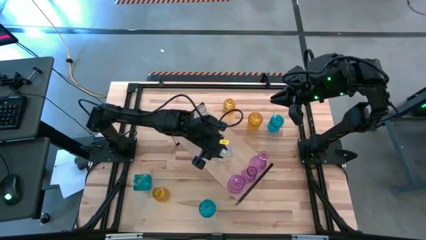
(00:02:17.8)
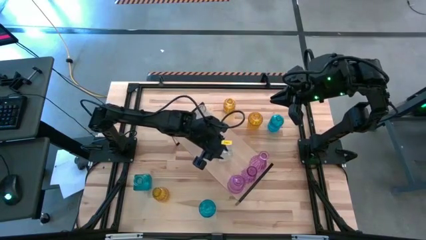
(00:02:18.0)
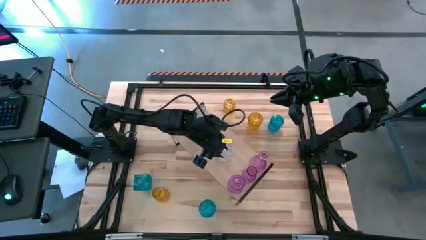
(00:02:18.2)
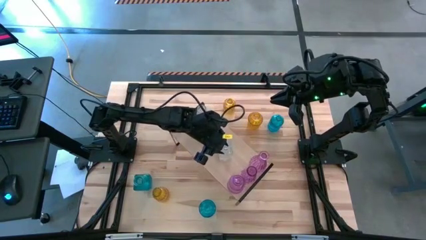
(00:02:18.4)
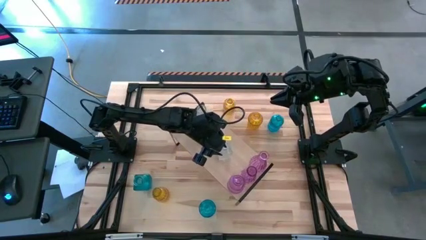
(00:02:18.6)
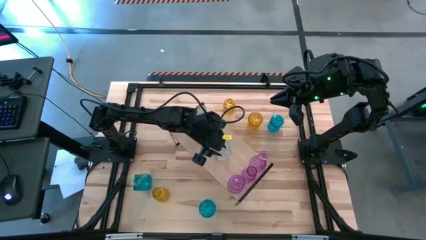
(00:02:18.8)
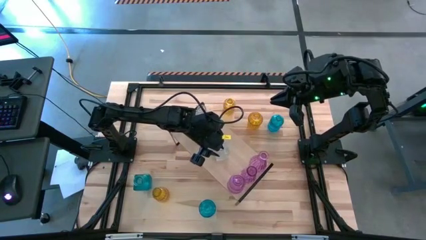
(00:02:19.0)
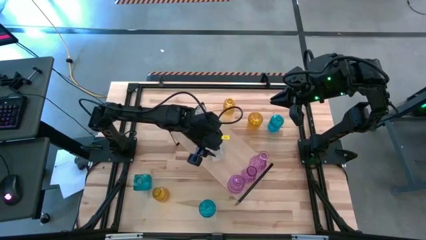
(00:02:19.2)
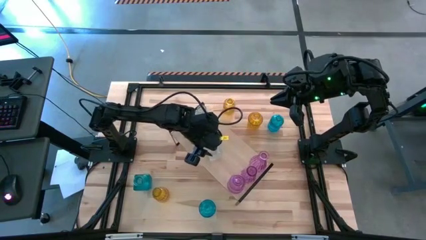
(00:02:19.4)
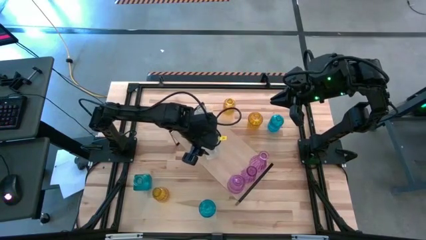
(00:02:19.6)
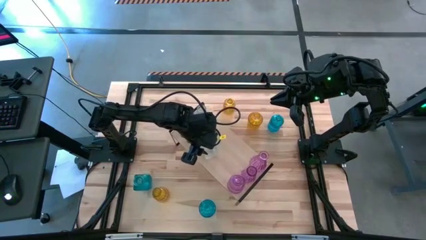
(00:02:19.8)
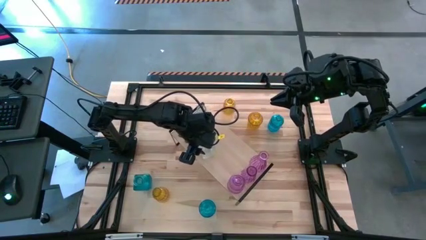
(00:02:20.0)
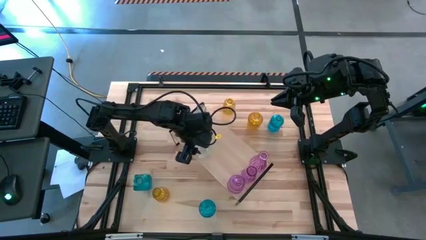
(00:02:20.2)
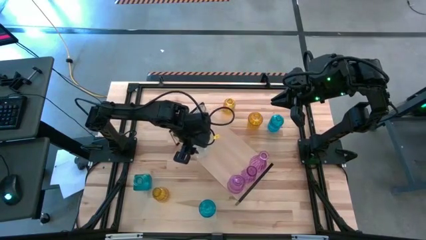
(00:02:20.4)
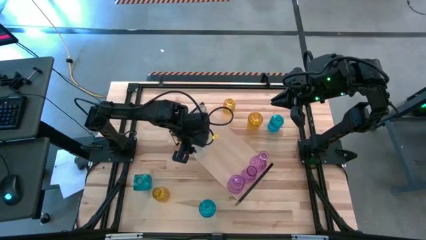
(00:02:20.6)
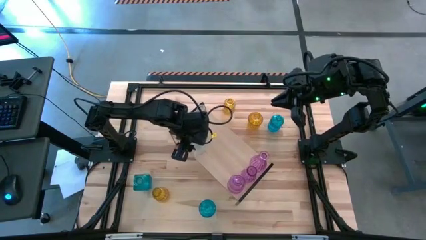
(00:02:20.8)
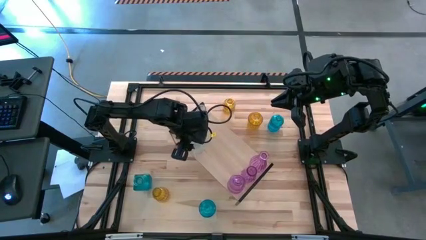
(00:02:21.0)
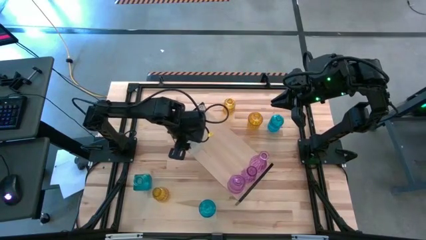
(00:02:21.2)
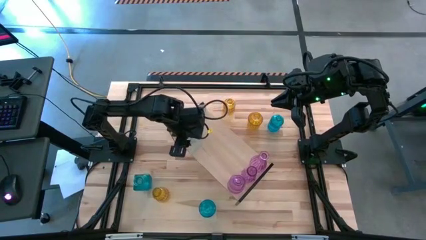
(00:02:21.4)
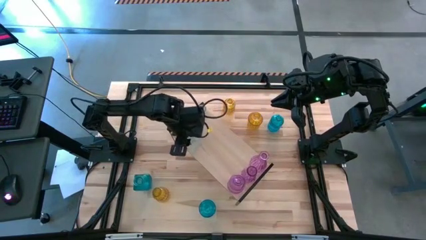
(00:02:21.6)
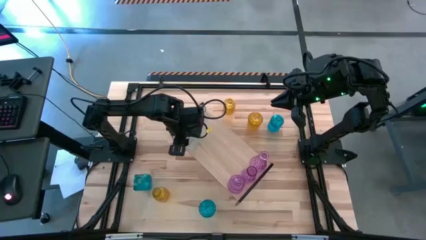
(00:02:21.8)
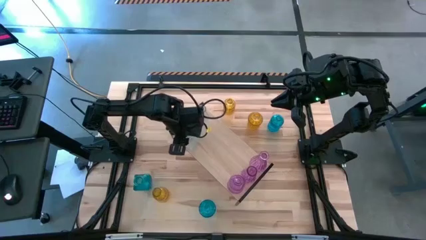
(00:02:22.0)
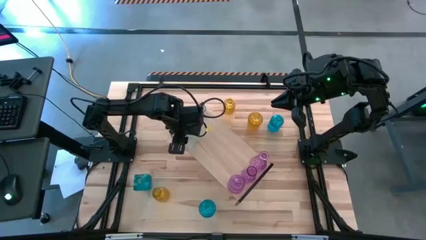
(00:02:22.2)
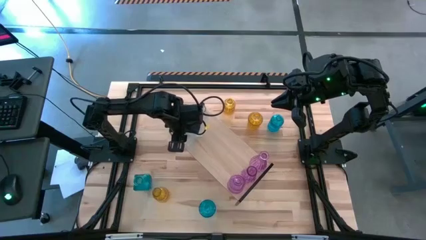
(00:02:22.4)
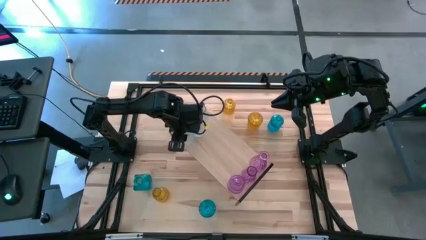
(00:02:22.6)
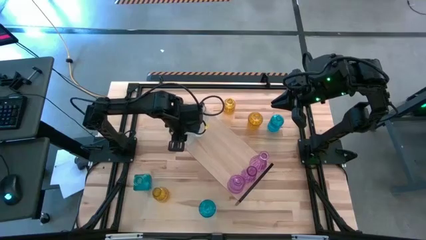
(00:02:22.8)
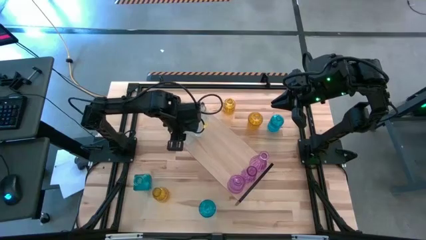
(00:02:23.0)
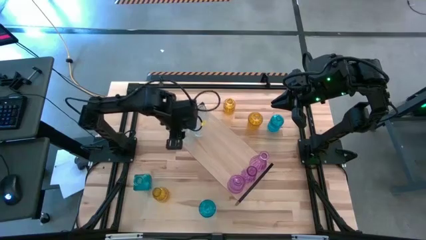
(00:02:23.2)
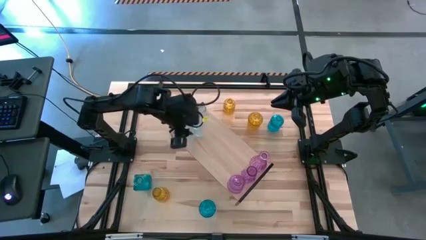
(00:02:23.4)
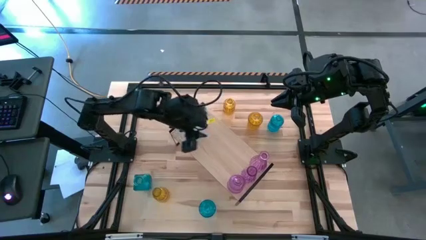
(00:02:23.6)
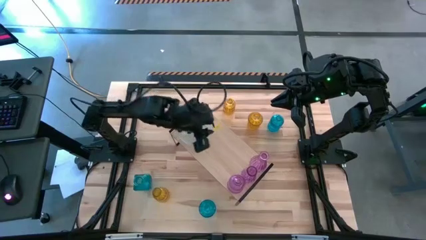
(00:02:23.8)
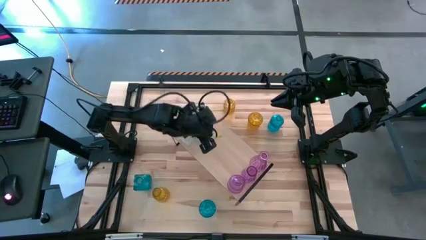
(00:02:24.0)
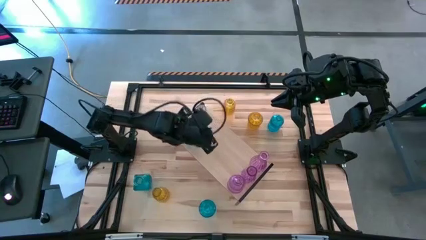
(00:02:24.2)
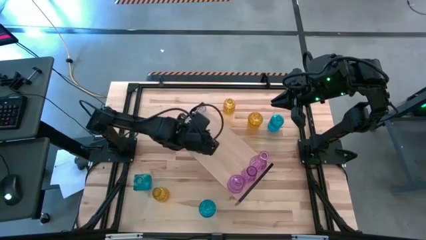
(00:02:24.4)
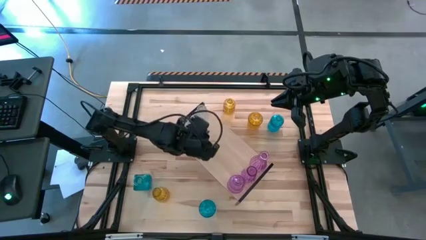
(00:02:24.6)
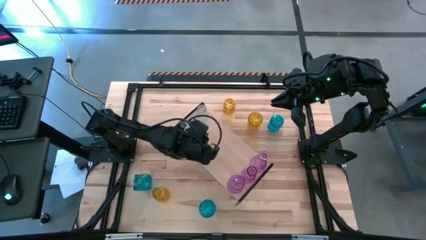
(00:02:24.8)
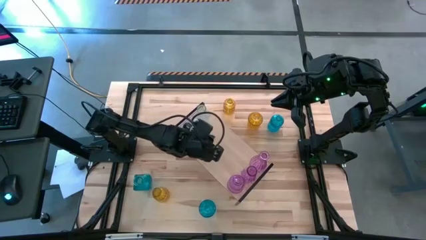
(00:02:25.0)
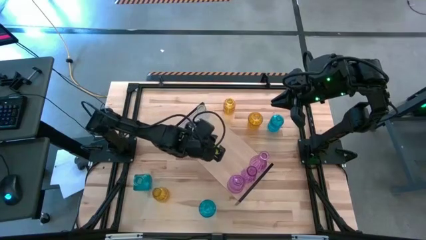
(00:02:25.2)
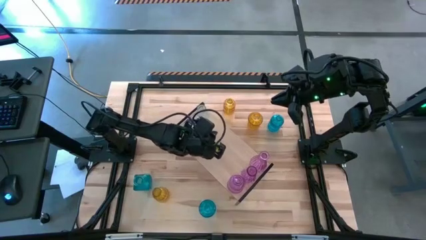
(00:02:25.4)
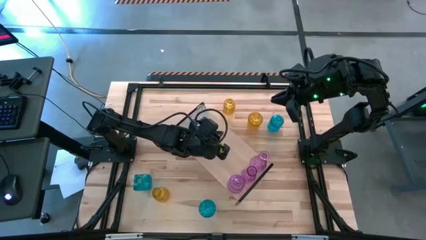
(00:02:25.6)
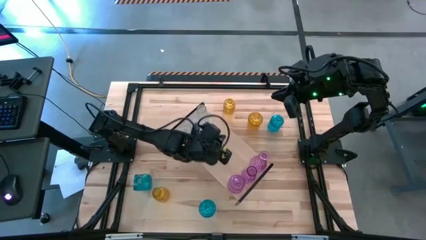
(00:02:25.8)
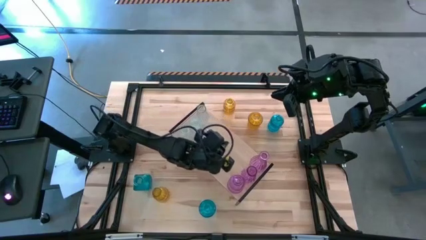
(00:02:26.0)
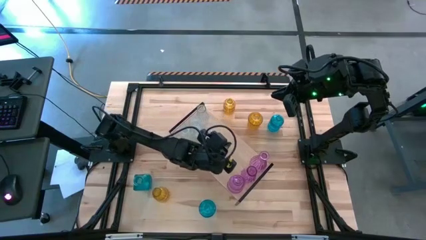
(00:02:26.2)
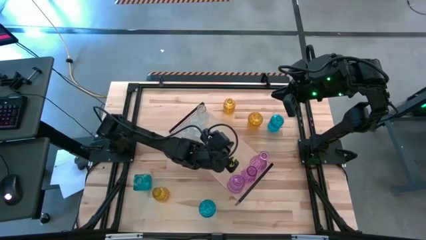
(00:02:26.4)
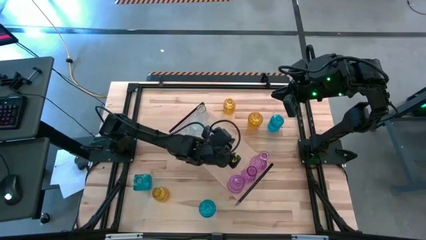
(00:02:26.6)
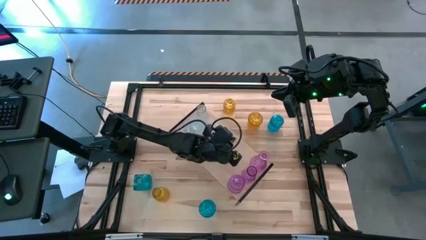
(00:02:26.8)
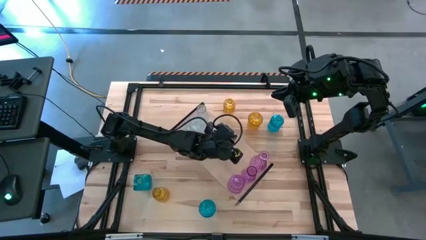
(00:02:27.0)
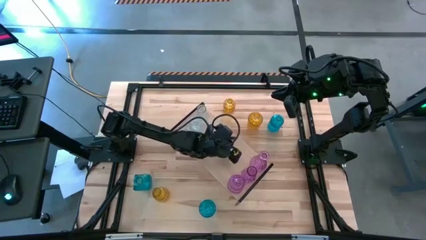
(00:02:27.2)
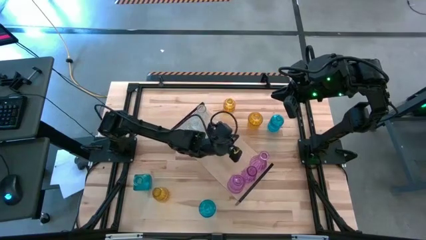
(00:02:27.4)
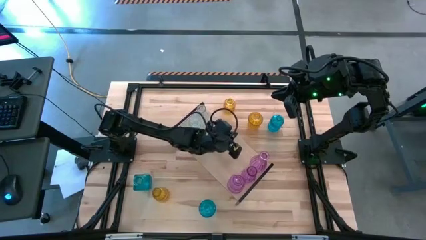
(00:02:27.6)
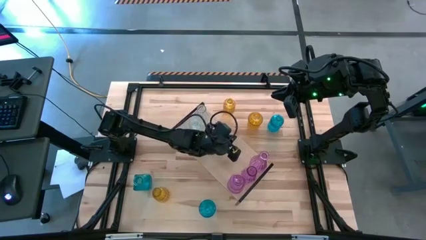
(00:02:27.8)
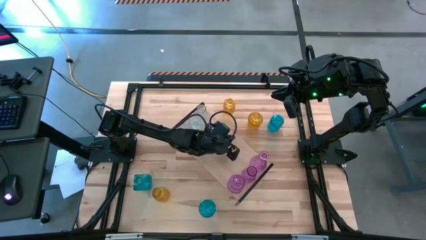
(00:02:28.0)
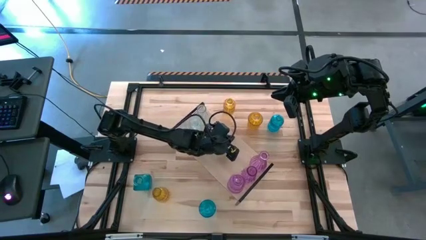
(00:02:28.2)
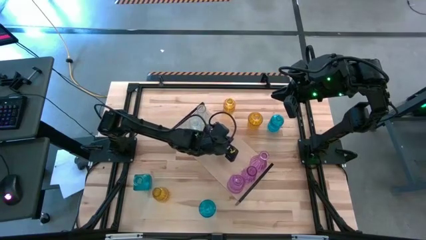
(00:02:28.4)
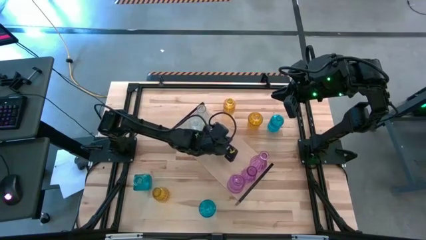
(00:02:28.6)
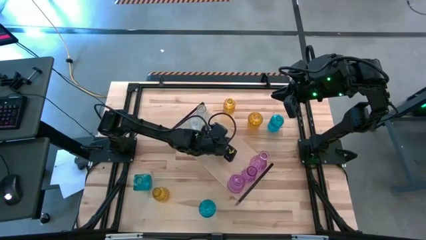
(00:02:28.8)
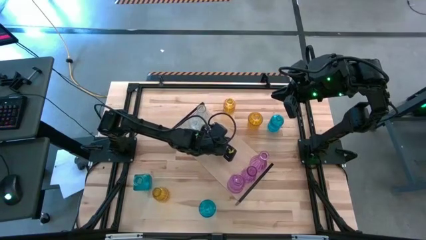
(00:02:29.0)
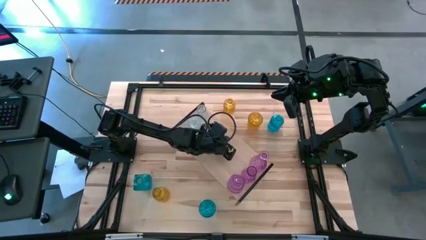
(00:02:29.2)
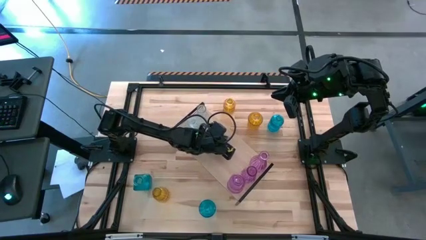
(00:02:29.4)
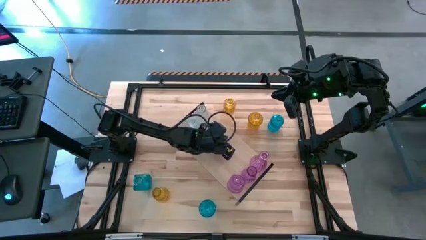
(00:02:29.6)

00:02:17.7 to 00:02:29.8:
Task: sort vases onto shelf
Put the transparent flower vase on the shelf aligned with the other transparent flower vases

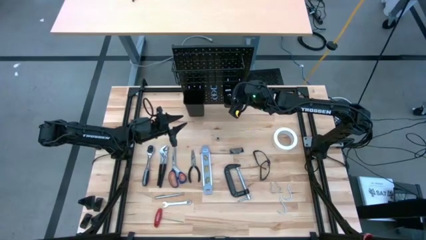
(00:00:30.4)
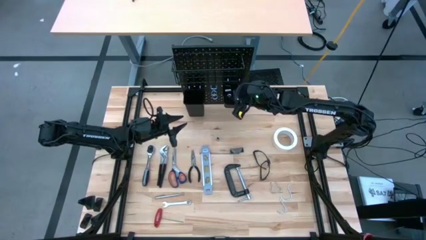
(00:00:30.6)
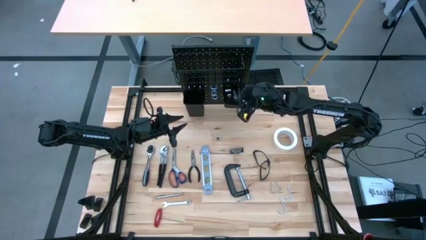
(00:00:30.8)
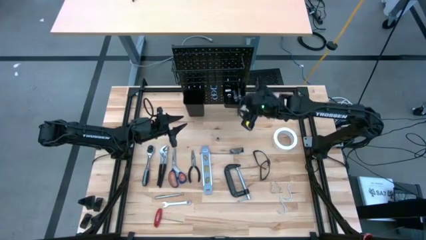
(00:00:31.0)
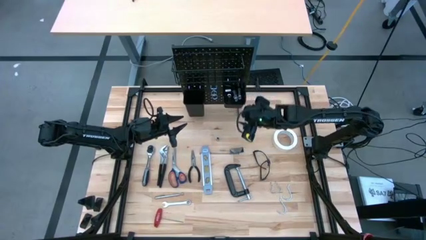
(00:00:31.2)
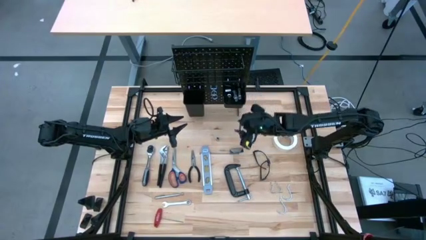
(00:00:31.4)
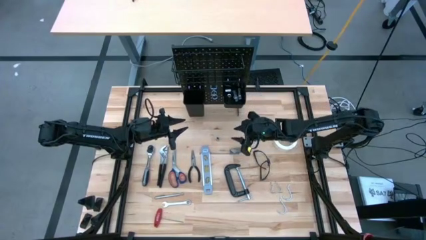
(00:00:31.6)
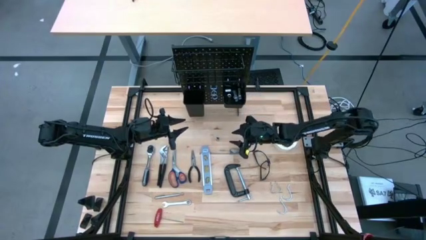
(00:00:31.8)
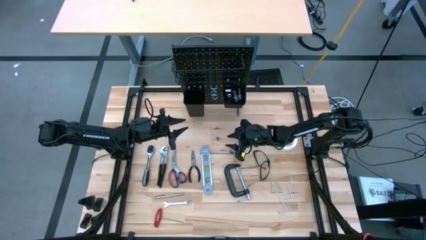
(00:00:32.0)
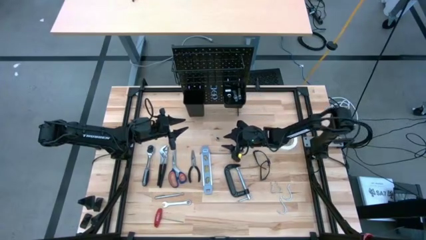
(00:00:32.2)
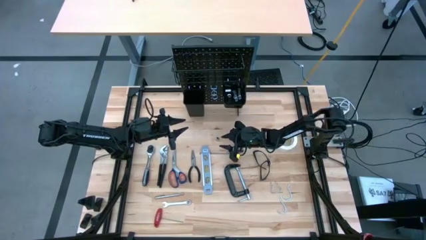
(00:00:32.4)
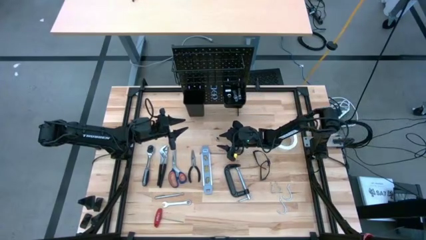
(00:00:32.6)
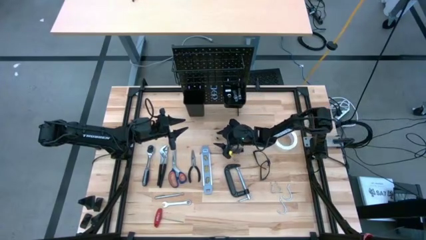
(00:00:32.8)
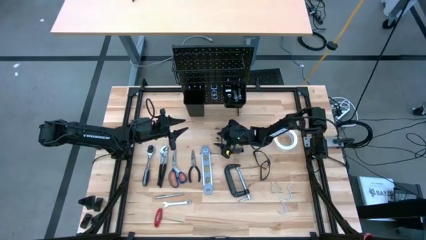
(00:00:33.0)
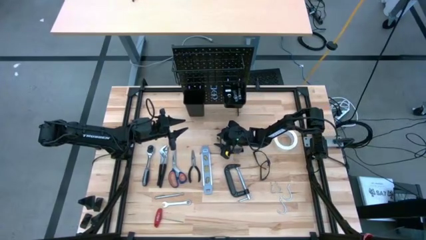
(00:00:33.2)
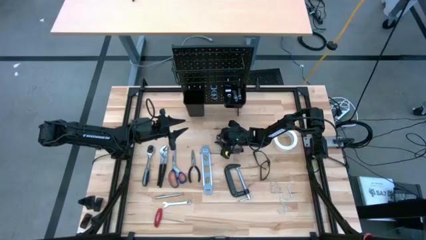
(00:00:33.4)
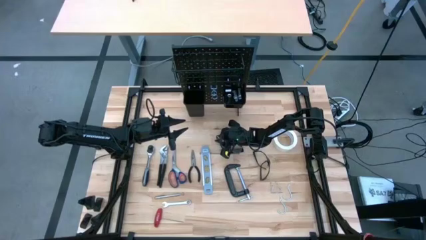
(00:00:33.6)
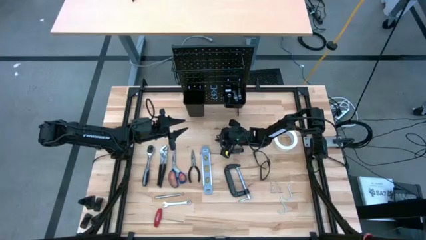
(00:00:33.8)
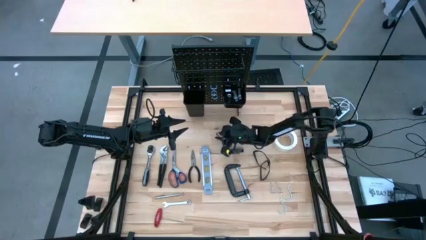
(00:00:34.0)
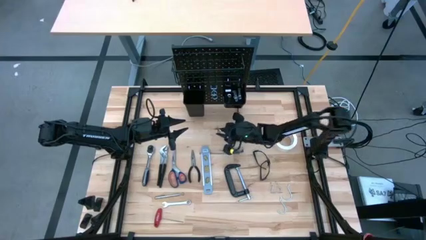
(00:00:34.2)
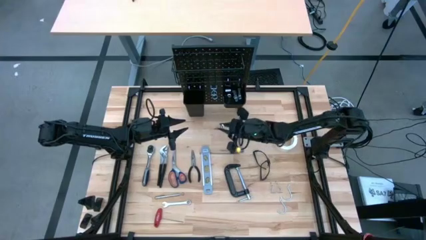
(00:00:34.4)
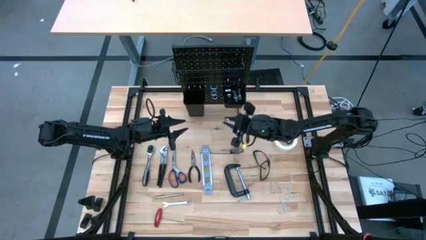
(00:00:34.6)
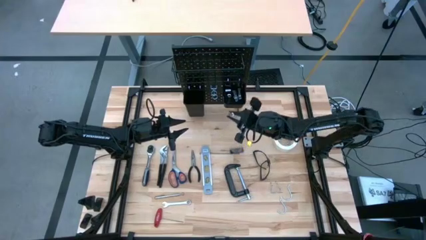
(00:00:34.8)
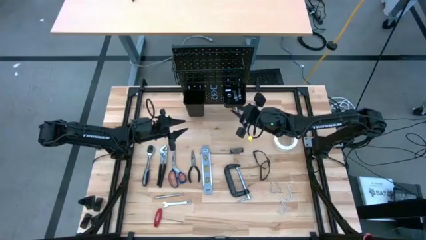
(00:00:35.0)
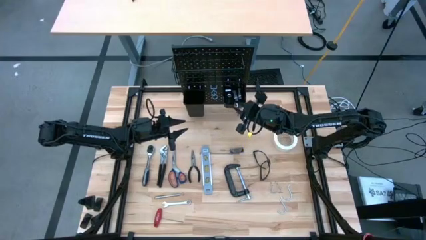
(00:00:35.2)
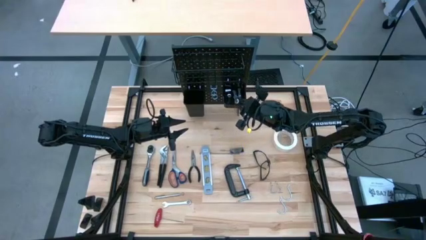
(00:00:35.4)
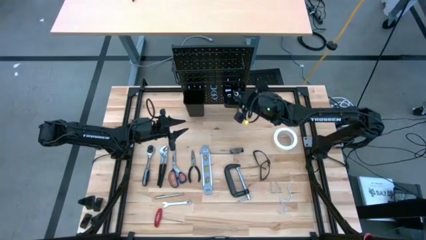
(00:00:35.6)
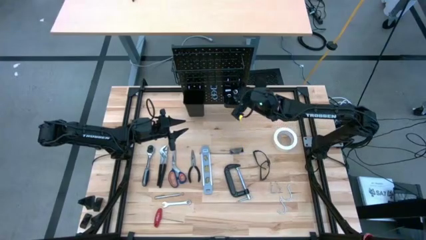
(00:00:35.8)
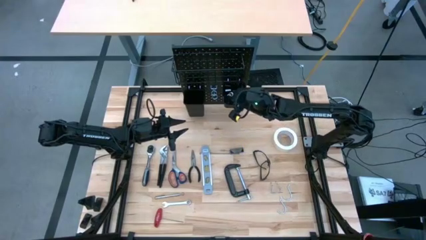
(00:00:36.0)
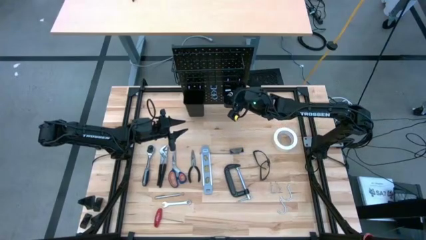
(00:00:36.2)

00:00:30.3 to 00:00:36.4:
Task: Hang tools onto peg board
Put the small socket into the right black bin on the peg board
